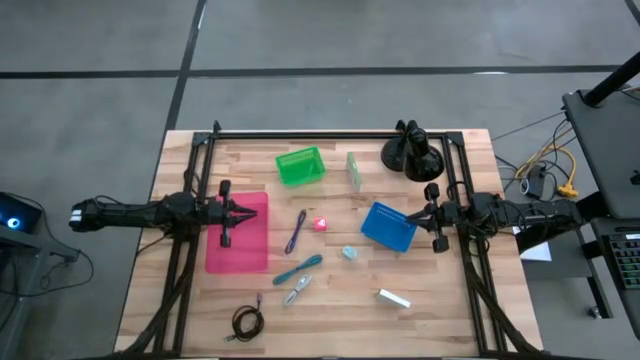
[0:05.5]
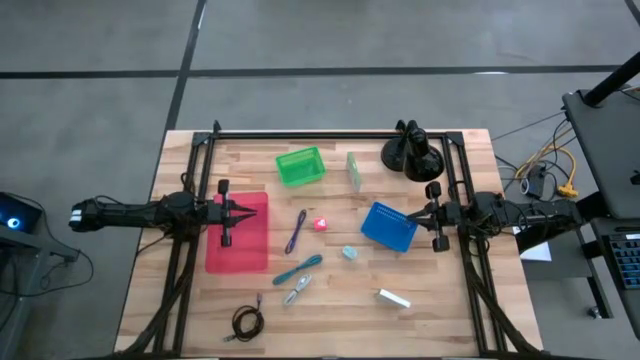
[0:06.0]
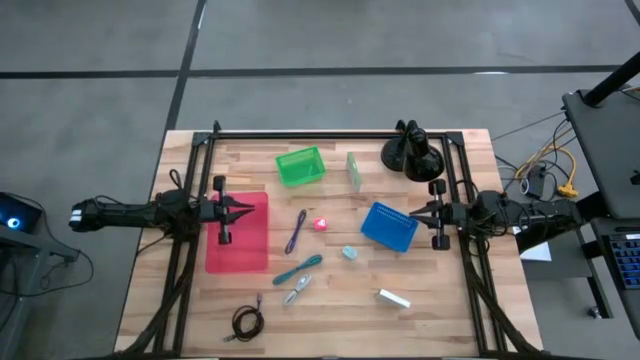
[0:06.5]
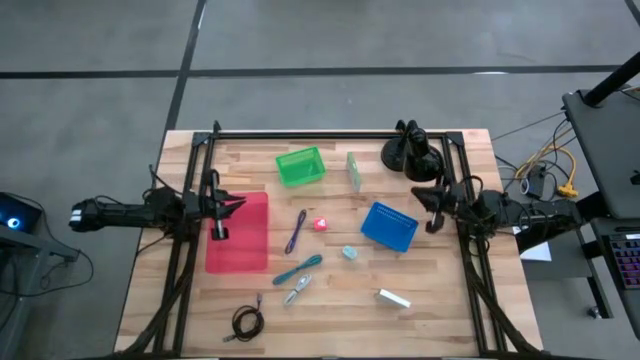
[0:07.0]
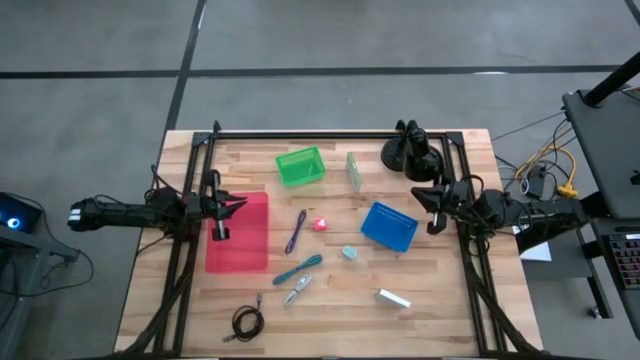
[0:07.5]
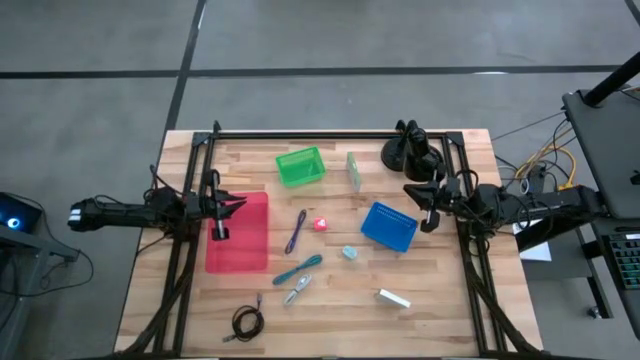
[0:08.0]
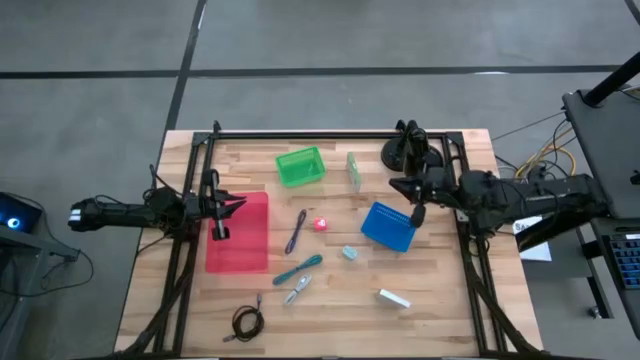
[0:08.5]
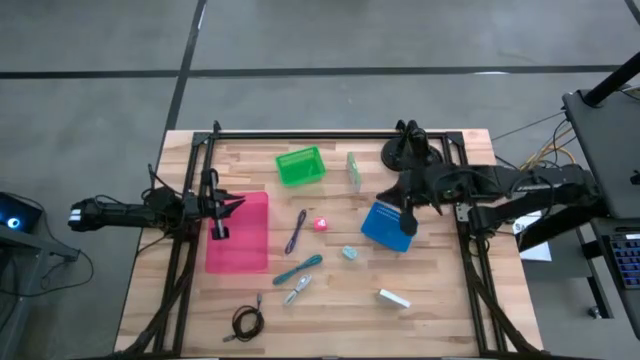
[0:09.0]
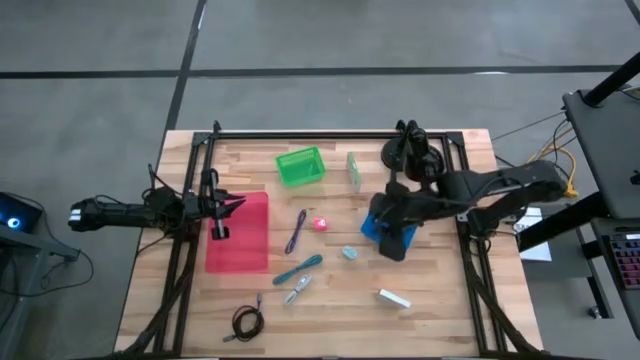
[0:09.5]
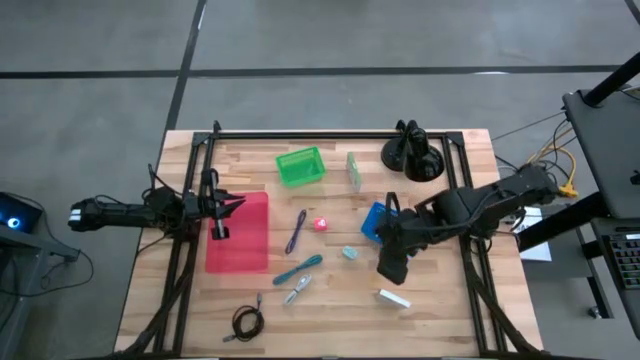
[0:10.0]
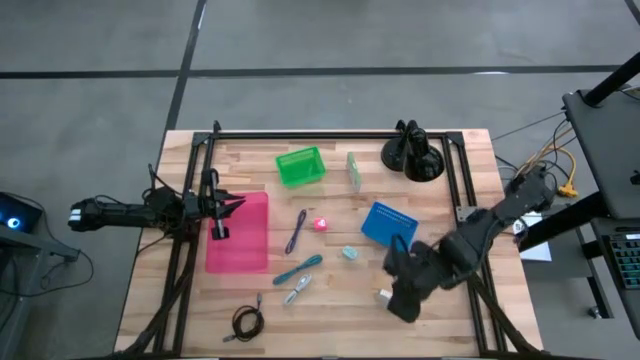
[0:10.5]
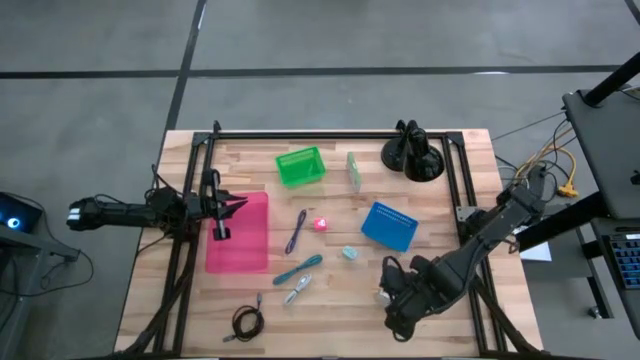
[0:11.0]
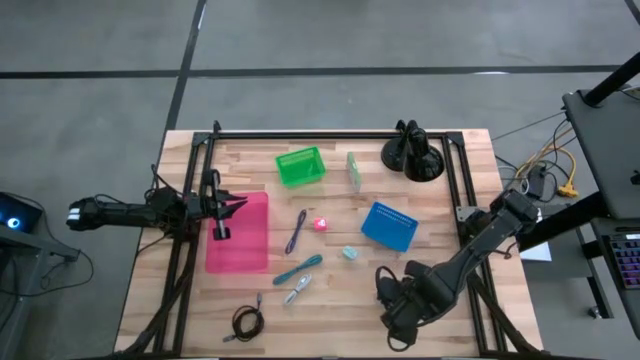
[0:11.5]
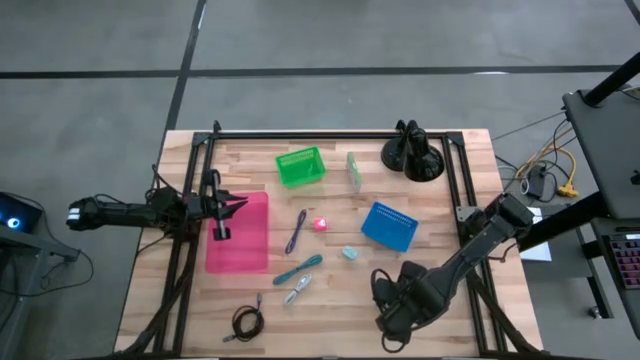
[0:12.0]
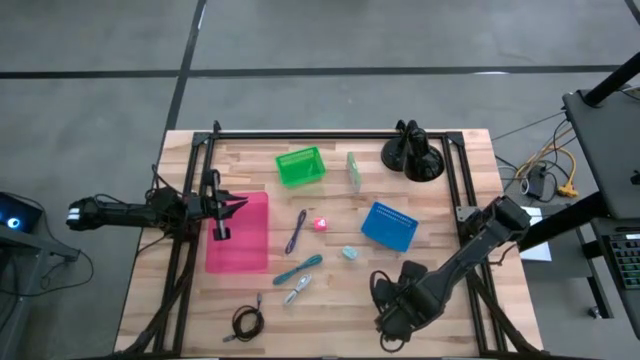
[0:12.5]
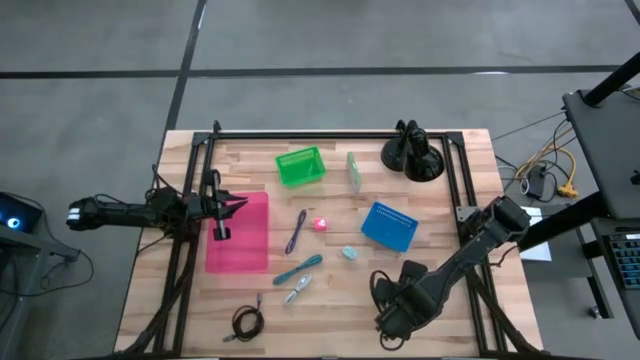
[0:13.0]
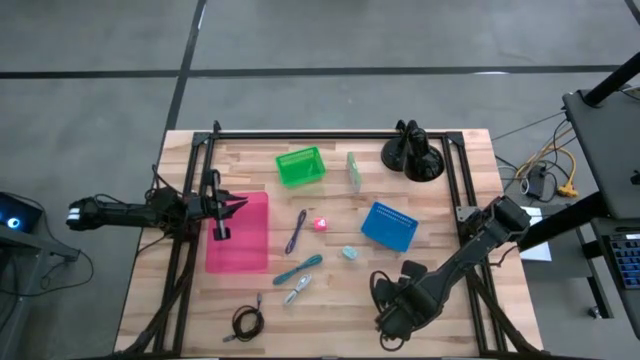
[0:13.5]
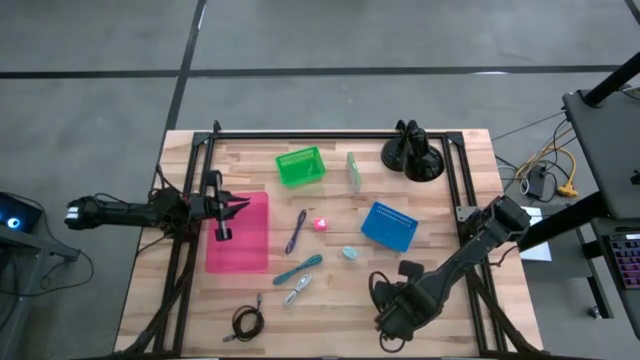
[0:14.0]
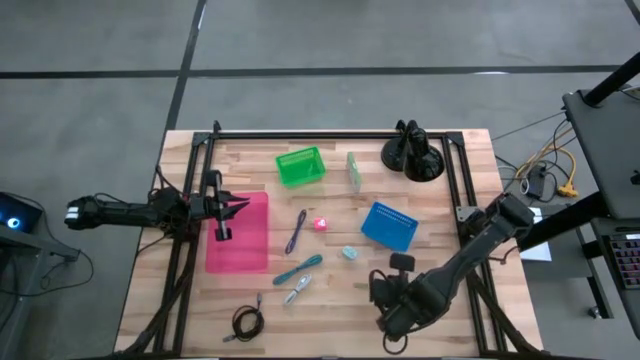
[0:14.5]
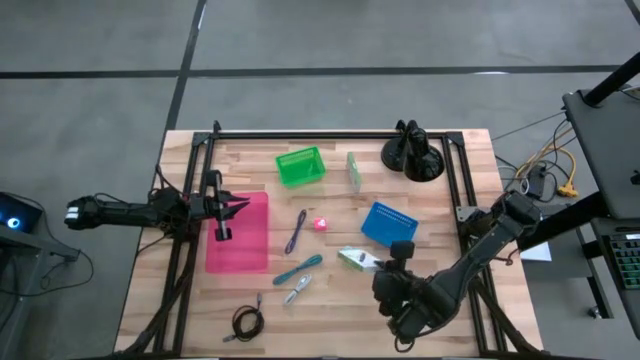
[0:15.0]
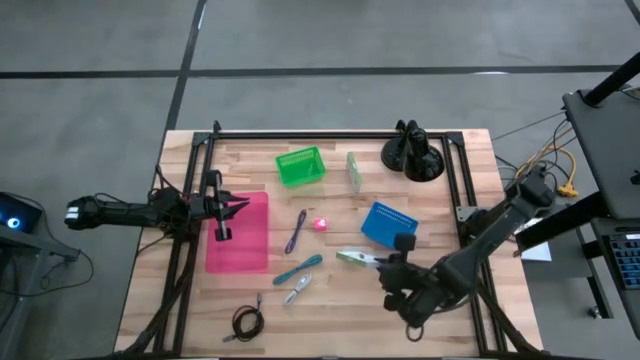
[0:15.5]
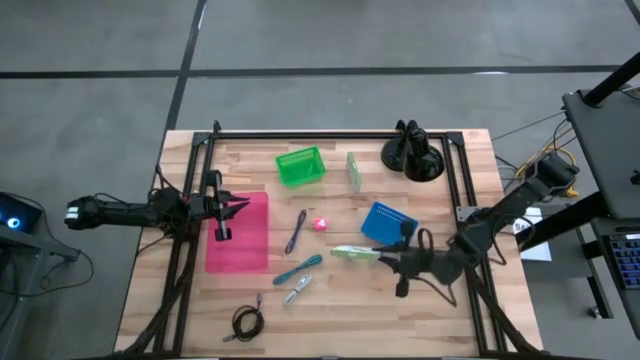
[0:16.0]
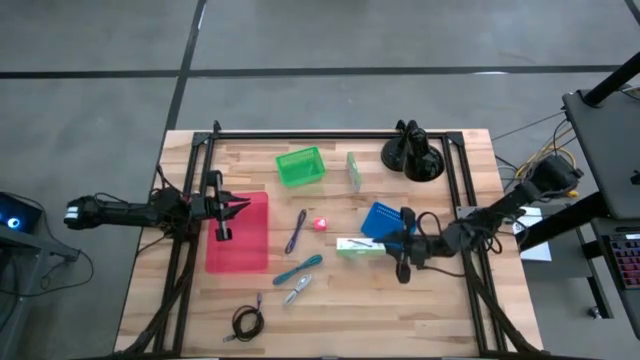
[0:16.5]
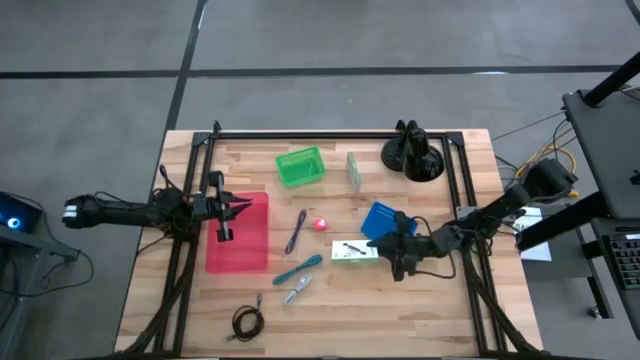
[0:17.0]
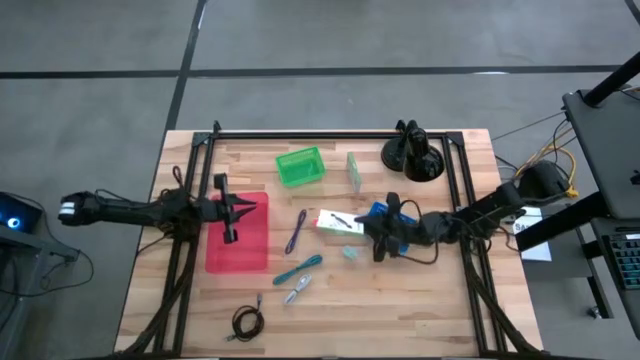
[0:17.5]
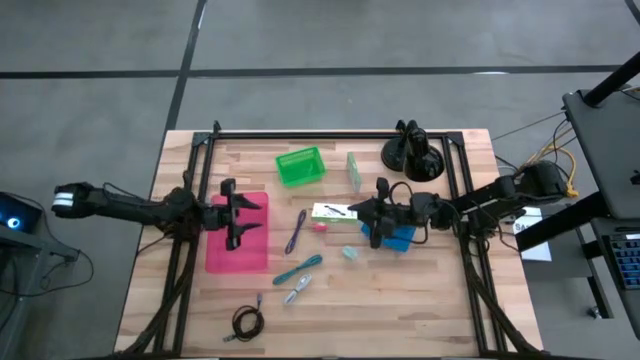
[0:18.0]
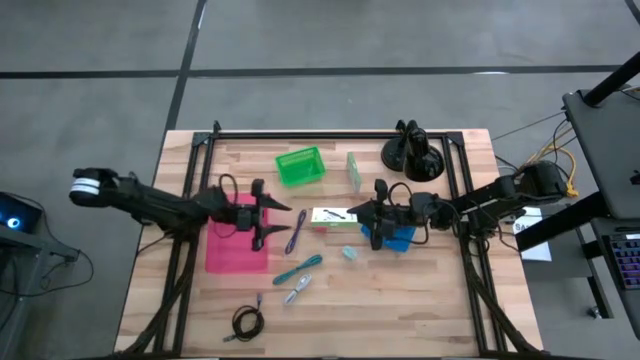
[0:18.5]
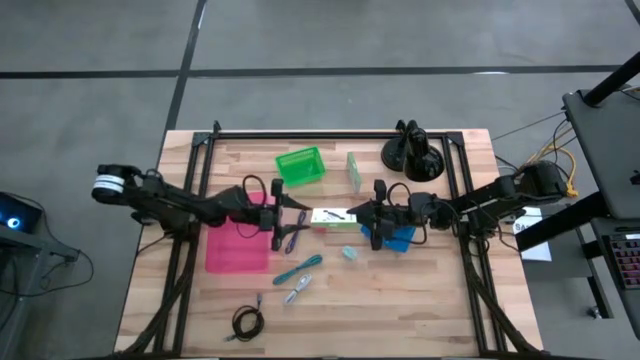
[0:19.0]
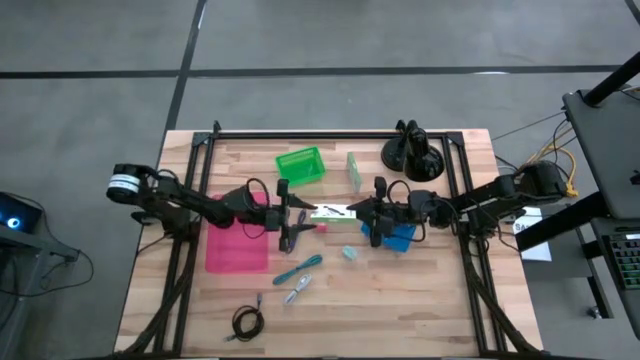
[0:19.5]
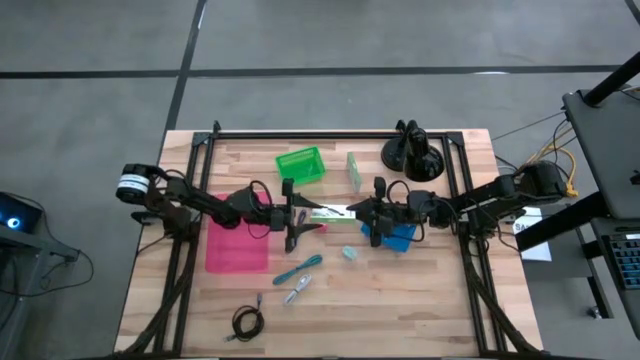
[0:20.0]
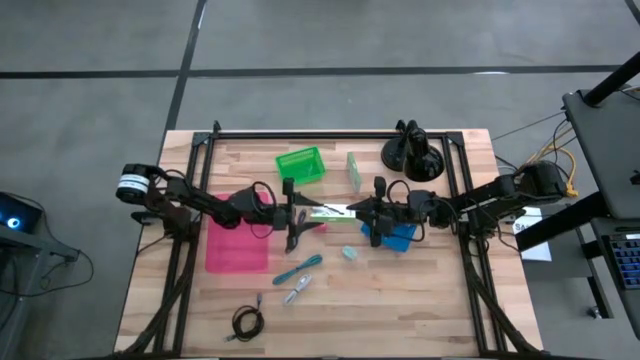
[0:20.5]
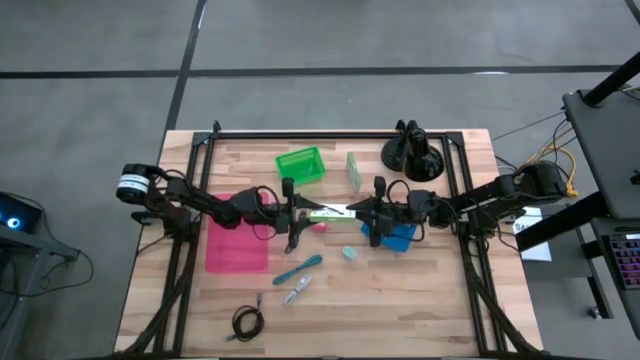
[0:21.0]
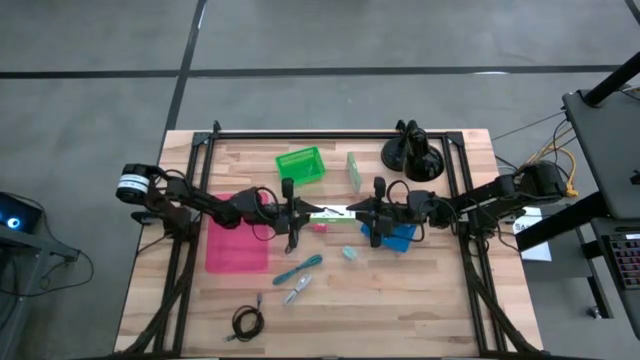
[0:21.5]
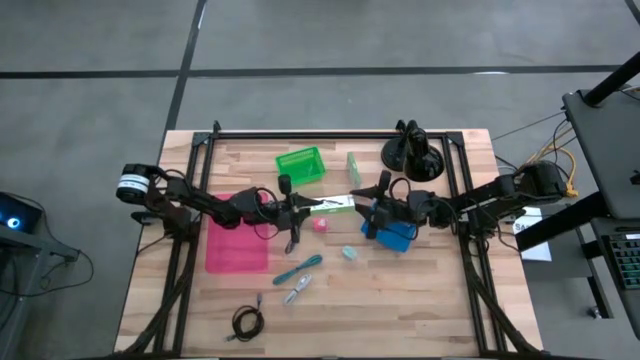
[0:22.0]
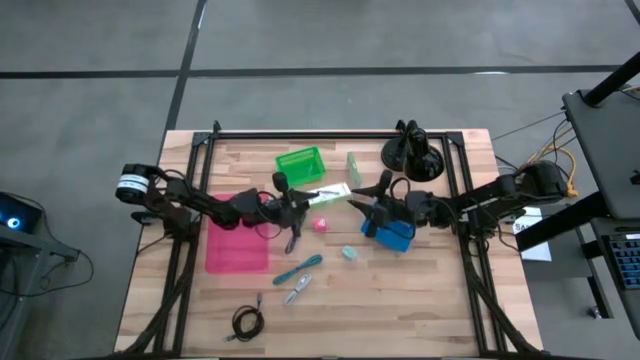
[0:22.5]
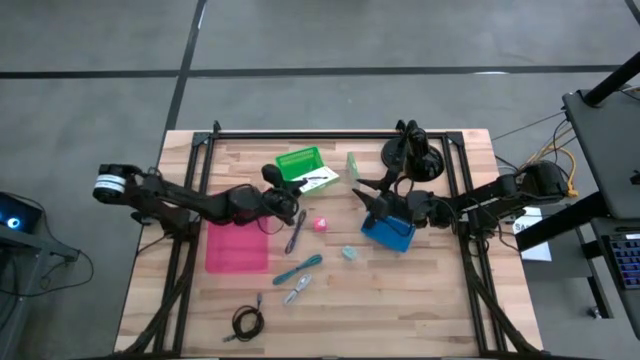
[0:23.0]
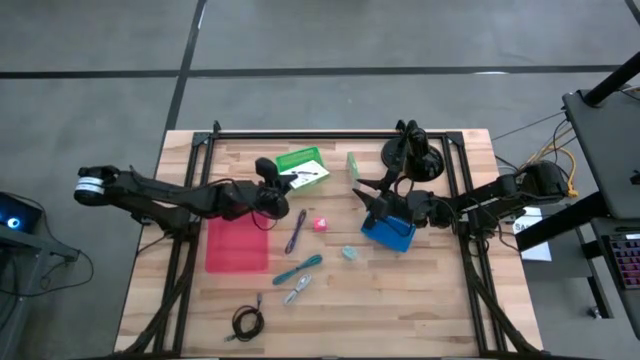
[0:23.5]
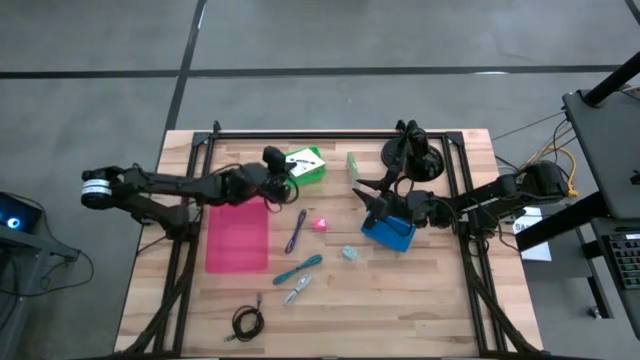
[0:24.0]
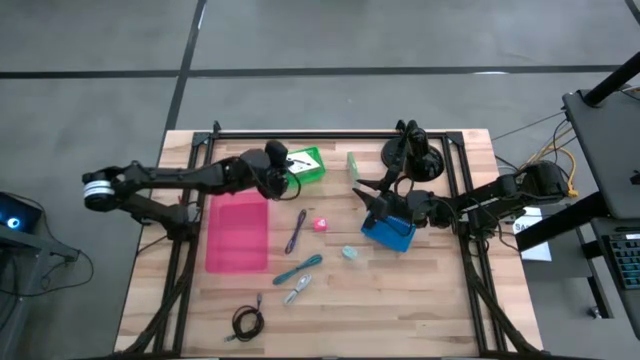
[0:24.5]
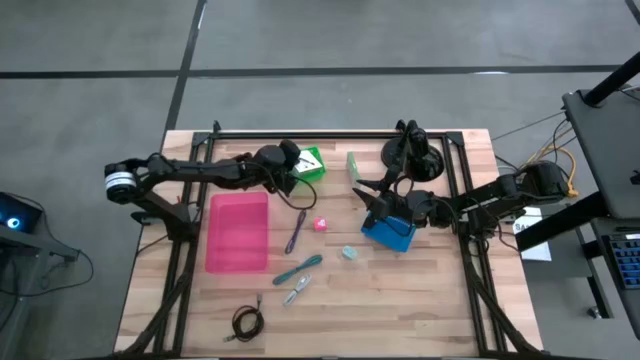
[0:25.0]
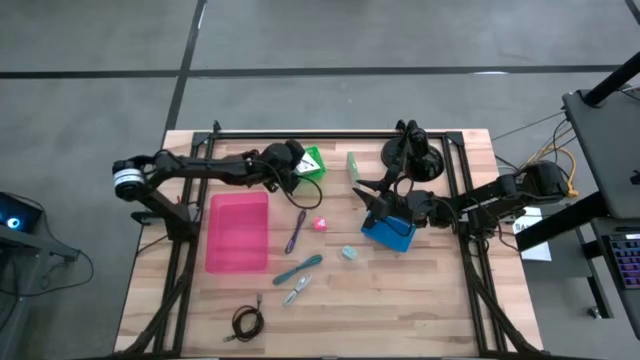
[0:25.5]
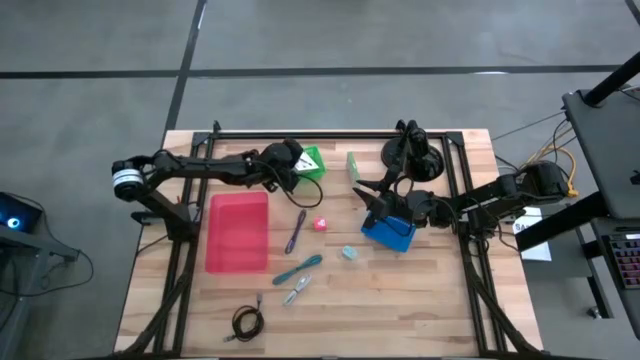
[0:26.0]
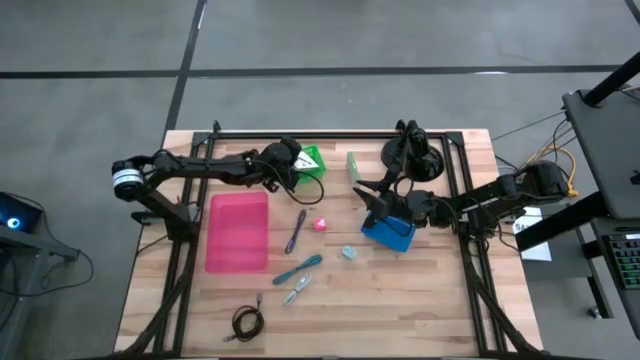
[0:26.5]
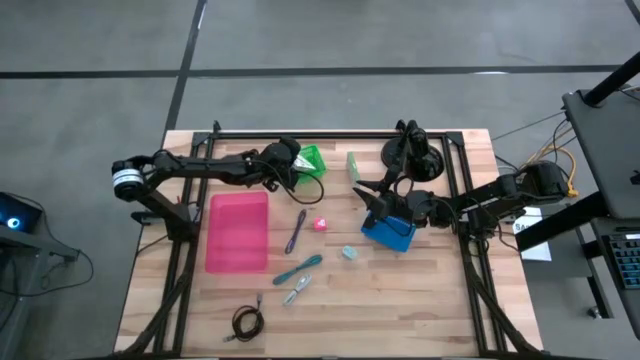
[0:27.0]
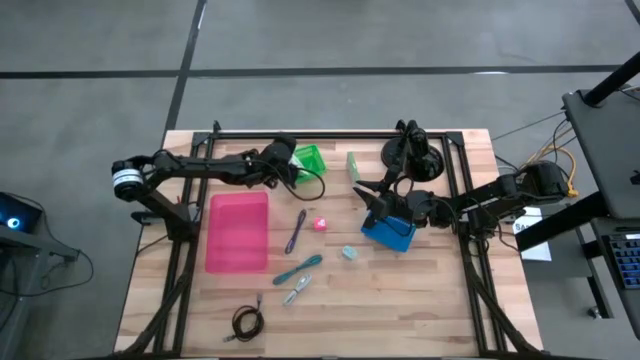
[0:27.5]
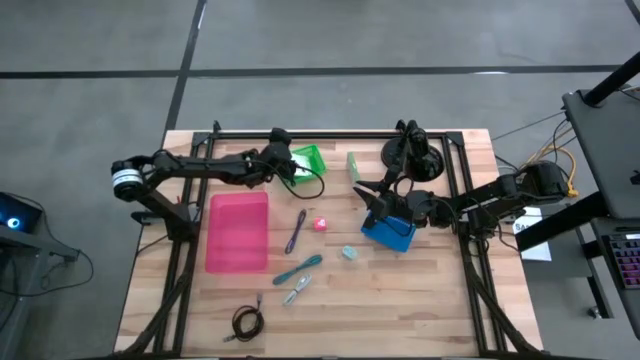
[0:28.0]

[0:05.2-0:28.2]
Task: Pick and place items into bin
Put the bottom card reader box into the green bin
